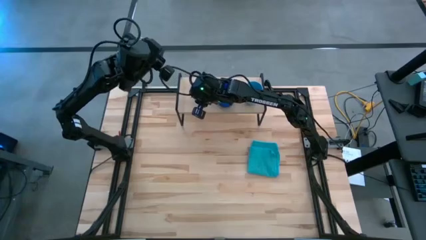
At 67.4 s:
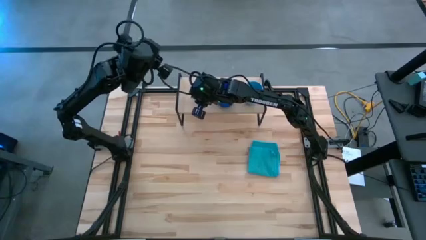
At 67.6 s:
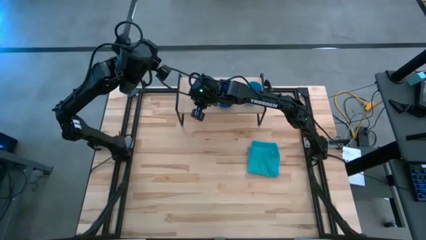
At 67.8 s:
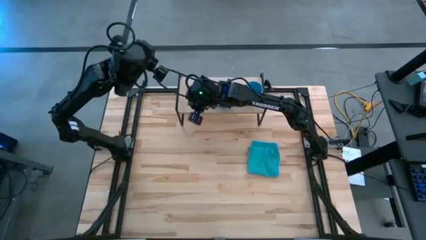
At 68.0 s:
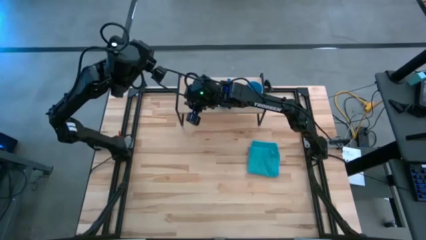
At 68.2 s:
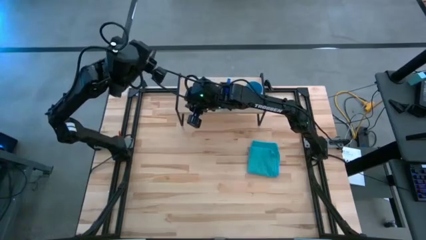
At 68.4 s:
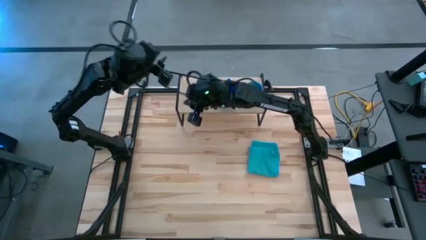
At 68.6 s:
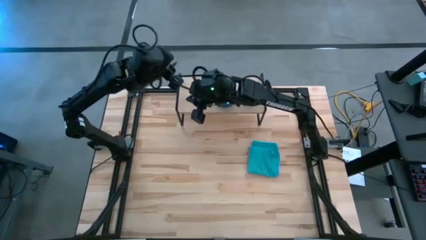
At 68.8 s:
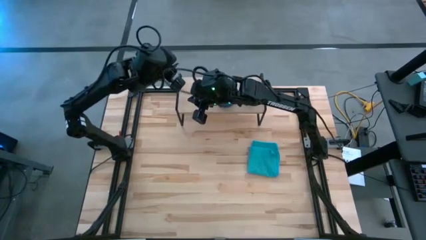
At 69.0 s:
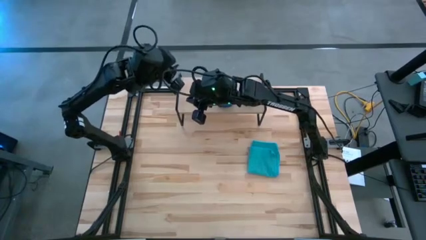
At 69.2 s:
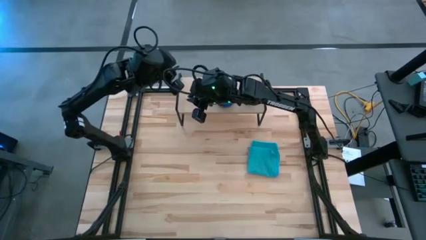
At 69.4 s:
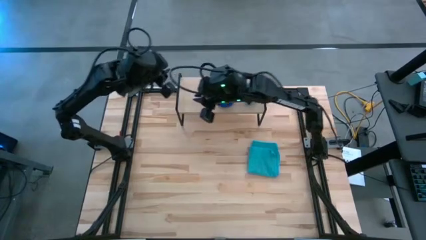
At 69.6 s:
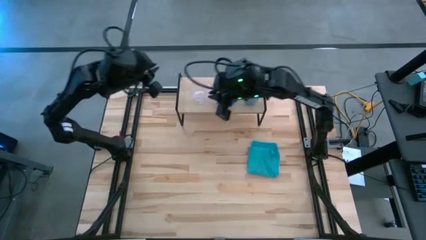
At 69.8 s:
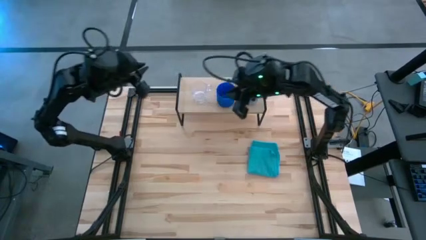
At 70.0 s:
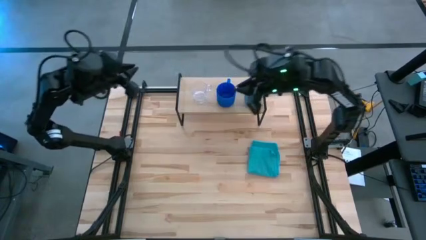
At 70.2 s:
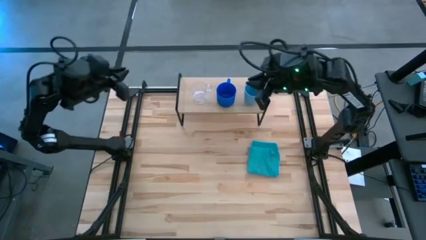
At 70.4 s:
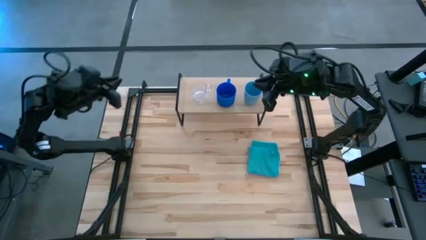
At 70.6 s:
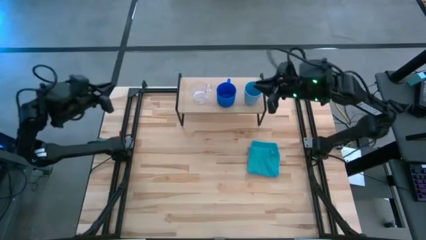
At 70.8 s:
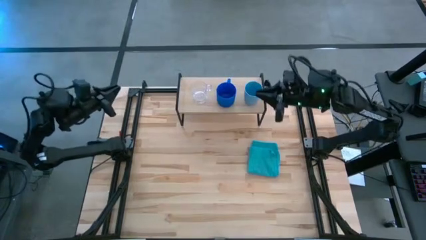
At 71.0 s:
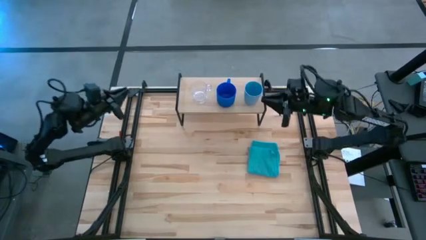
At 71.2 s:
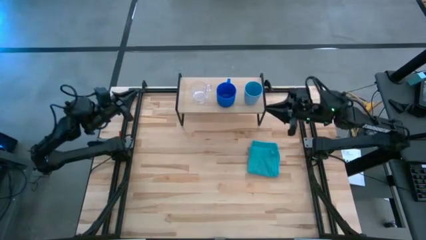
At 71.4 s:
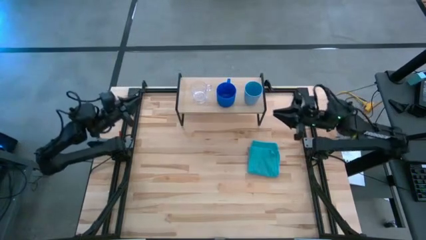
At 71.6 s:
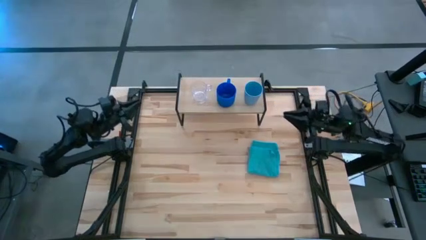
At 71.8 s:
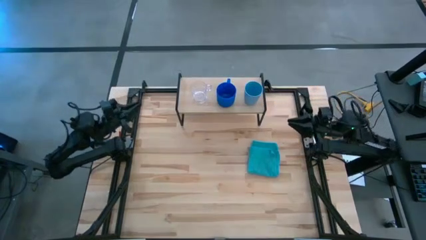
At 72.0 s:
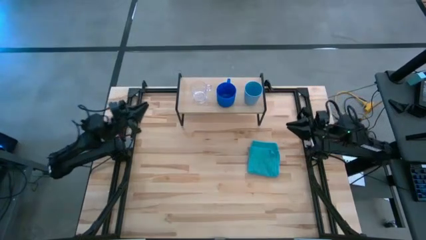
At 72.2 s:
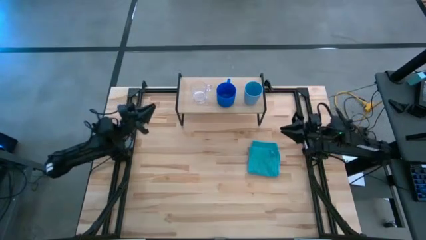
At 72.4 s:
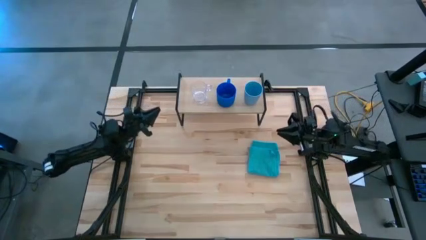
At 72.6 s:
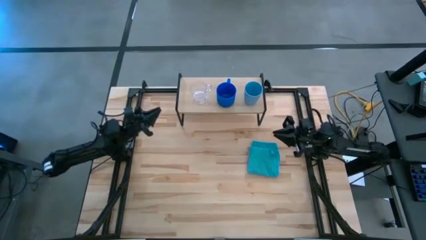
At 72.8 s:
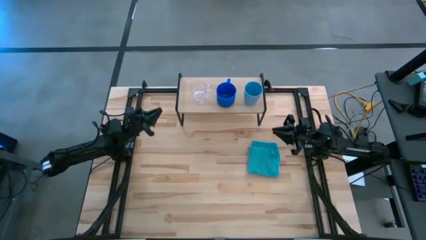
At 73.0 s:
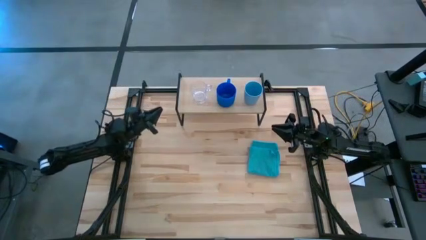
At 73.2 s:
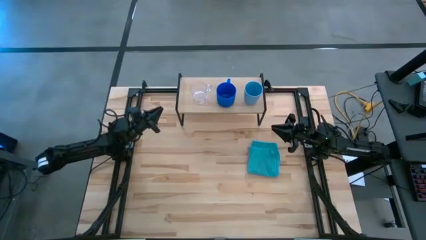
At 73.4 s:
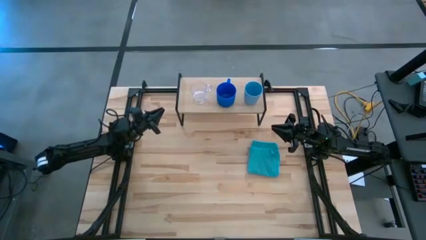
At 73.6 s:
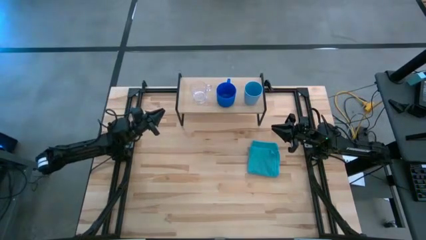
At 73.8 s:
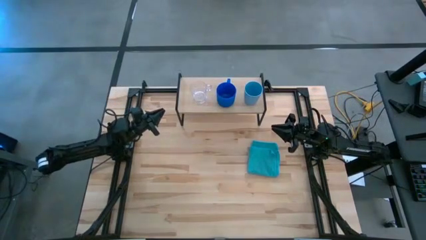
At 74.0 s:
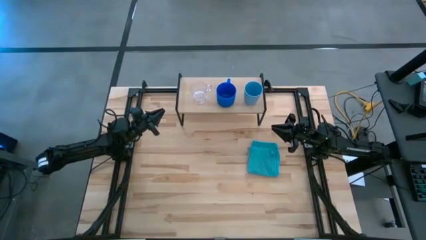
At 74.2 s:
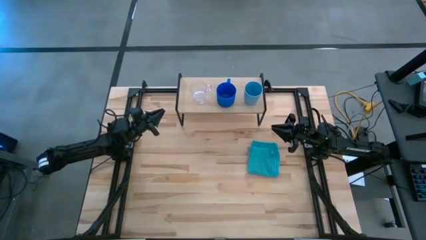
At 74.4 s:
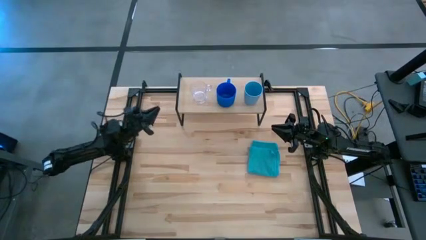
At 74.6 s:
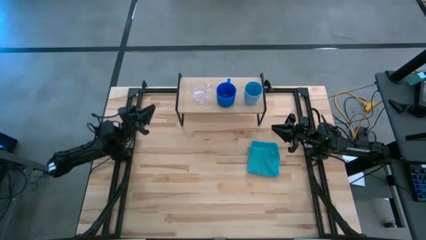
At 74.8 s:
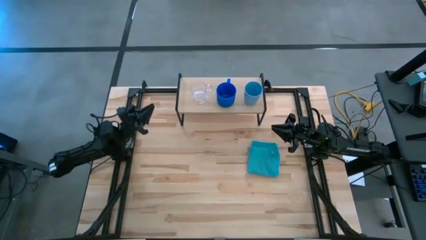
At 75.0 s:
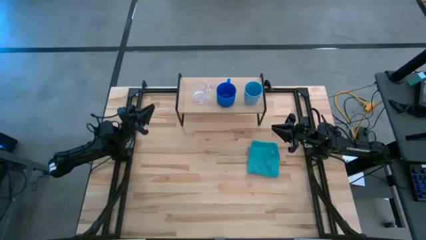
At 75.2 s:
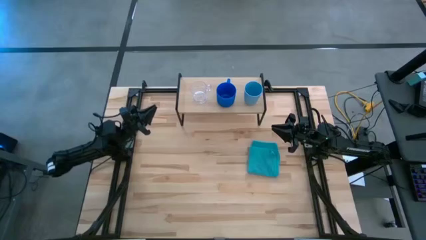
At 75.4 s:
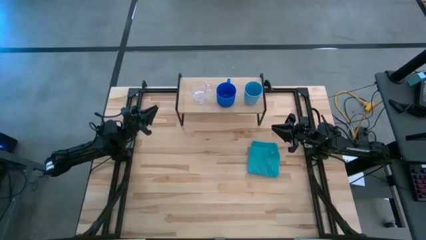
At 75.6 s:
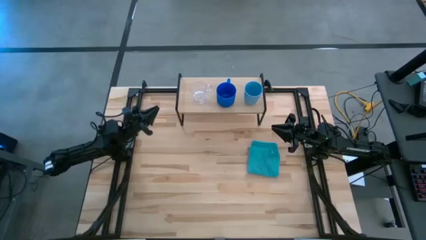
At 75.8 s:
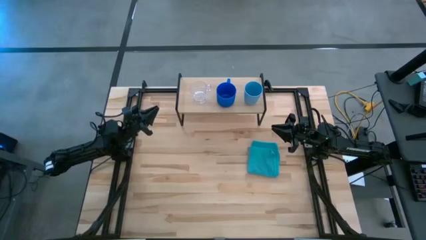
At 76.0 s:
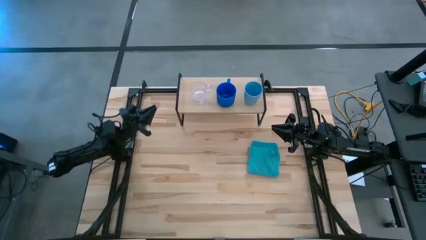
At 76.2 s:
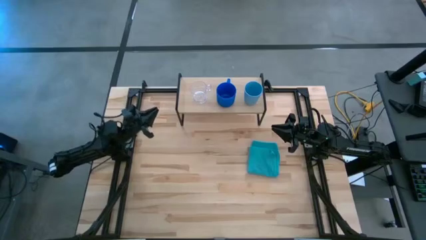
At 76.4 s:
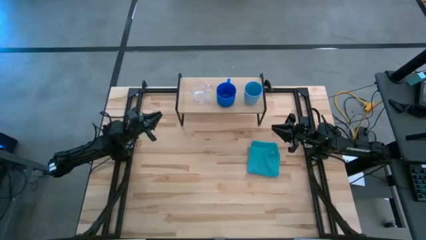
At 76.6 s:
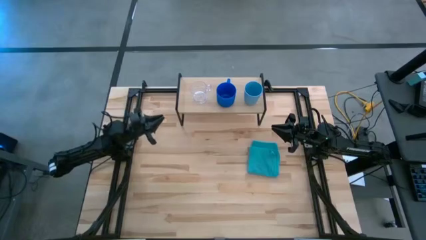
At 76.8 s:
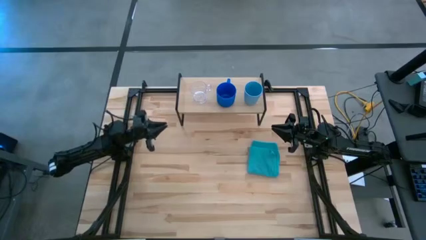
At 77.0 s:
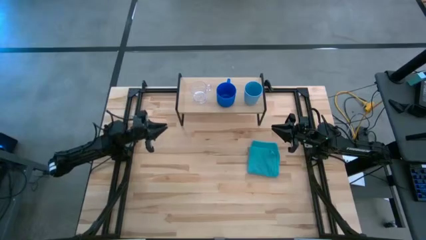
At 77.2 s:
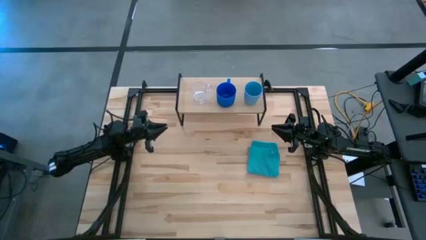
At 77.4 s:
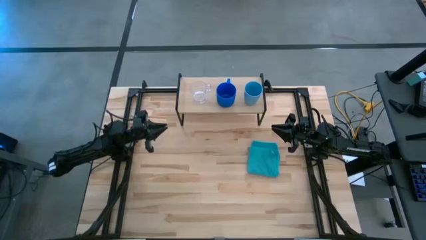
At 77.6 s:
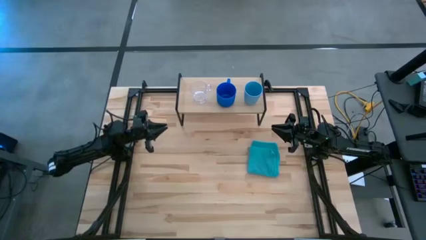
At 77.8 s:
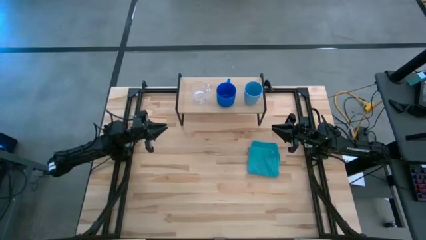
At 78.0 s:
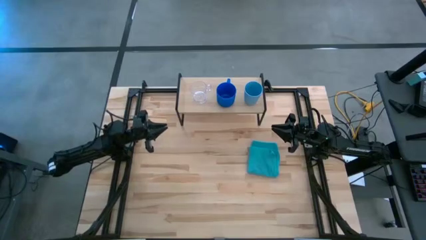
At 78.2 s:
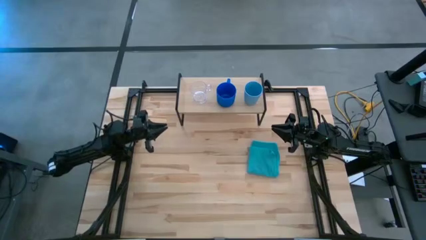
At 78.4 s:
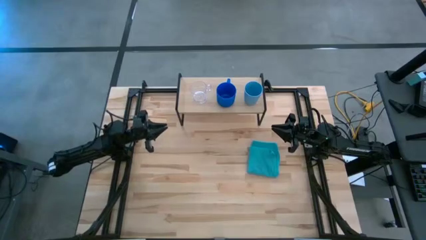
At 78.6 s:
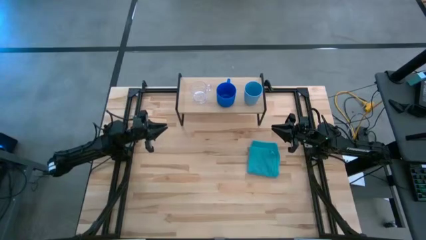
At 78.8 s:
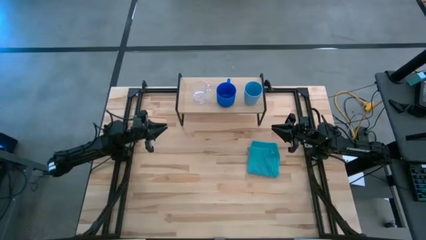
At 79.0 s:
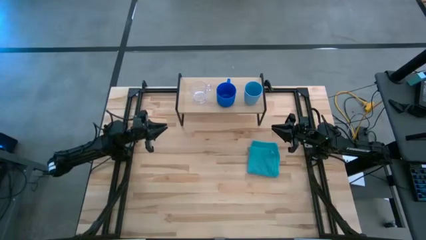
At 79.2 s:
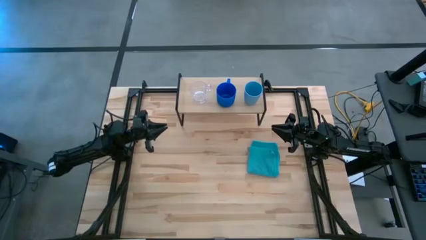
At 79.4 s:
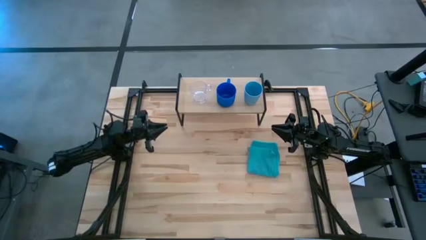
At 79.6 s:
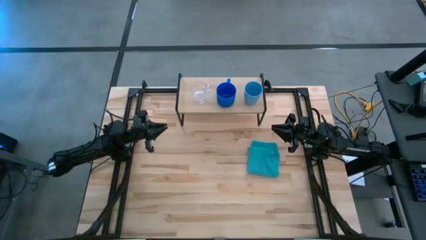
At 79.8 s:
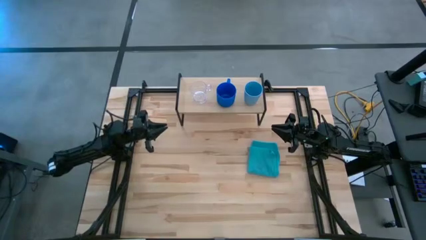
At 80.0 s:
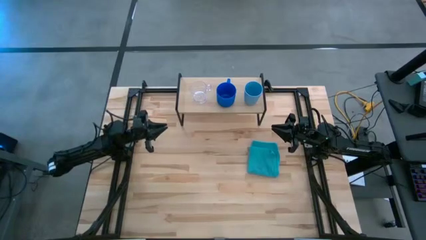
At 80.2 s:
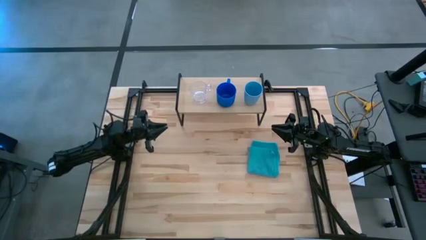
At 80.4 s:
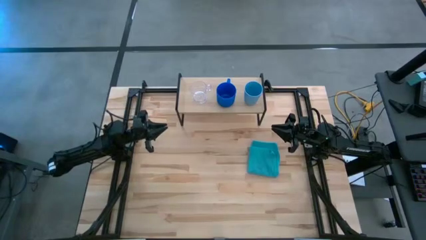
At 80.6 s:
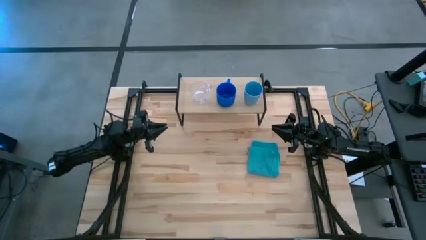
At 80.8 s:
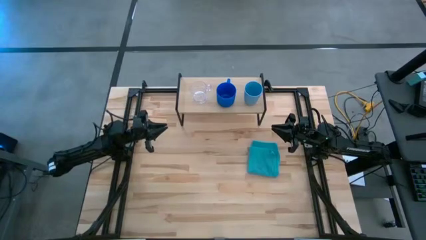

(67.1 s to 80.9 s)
Task: Stack small to large cups/mugs on shelf
Return to Home Position
